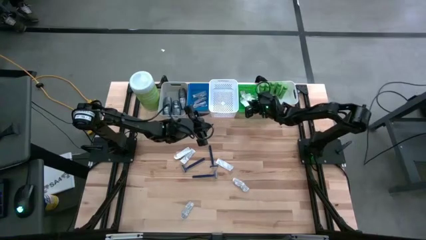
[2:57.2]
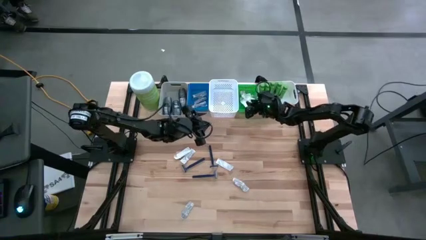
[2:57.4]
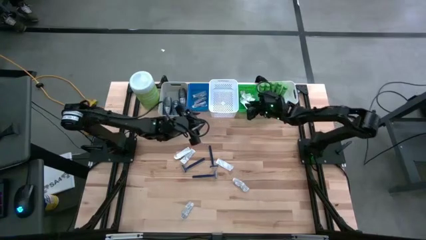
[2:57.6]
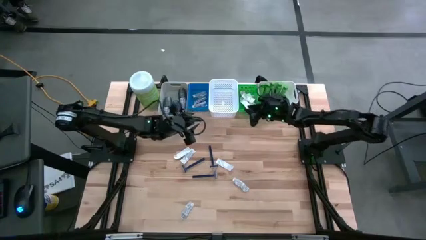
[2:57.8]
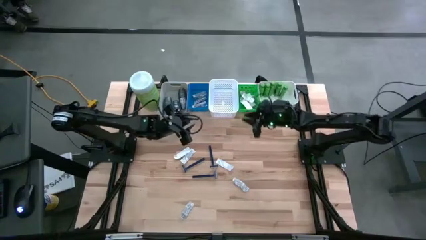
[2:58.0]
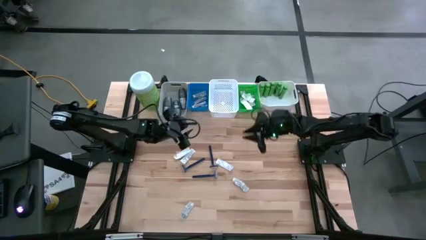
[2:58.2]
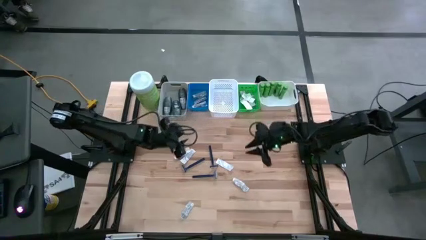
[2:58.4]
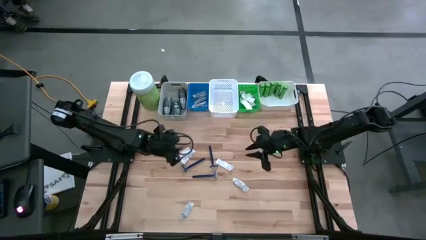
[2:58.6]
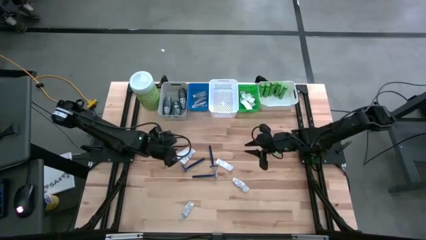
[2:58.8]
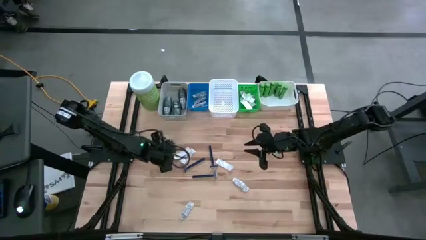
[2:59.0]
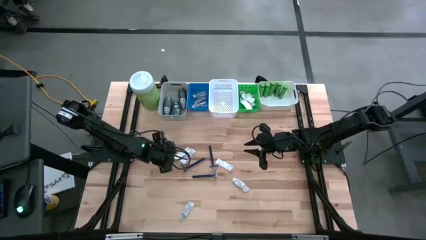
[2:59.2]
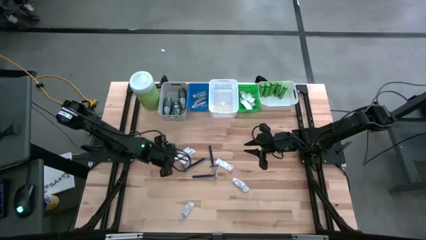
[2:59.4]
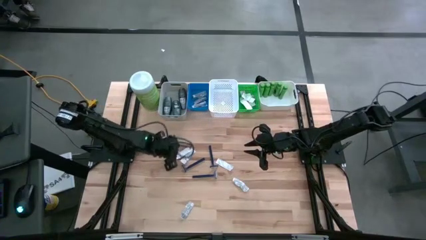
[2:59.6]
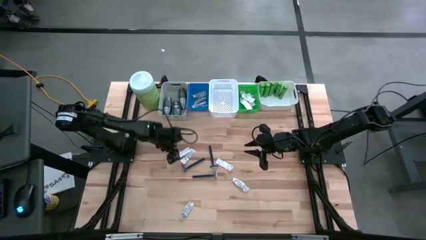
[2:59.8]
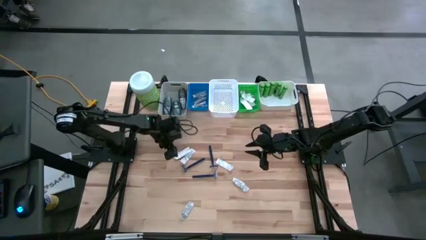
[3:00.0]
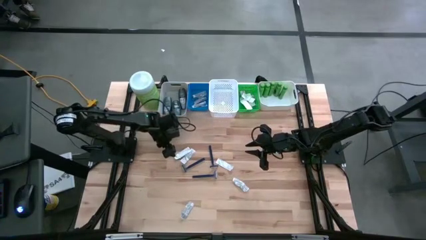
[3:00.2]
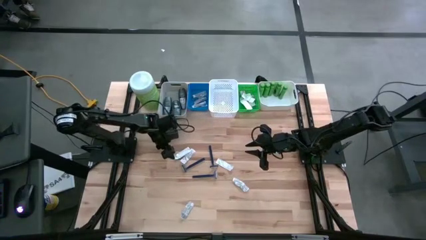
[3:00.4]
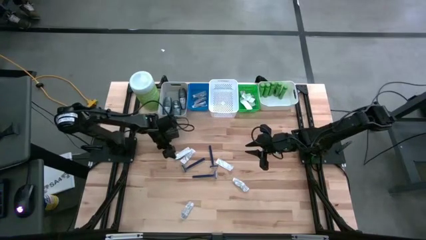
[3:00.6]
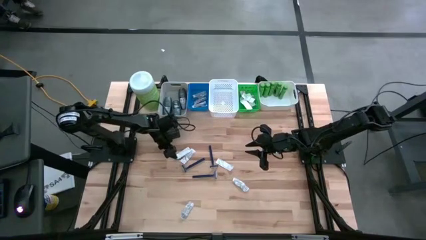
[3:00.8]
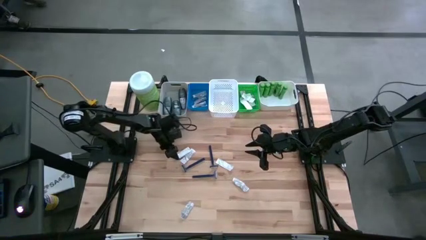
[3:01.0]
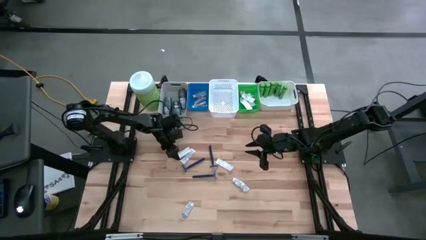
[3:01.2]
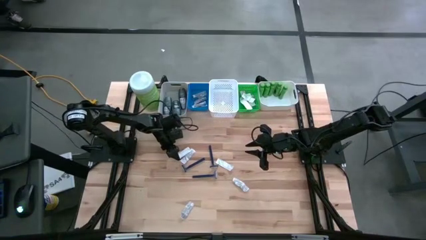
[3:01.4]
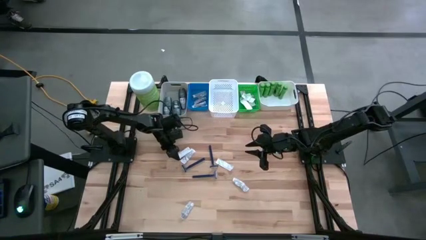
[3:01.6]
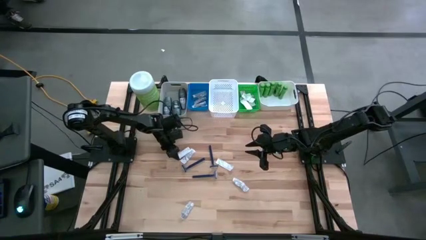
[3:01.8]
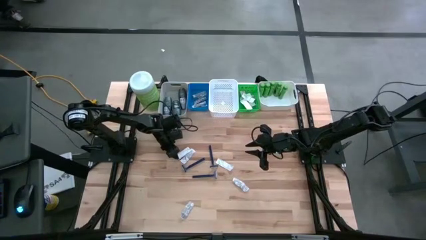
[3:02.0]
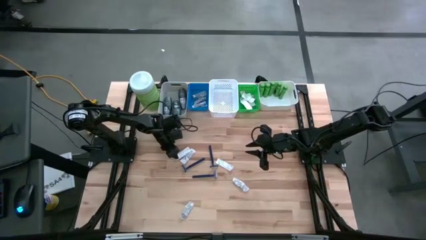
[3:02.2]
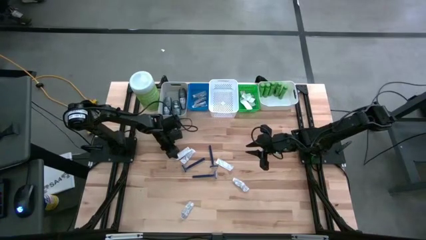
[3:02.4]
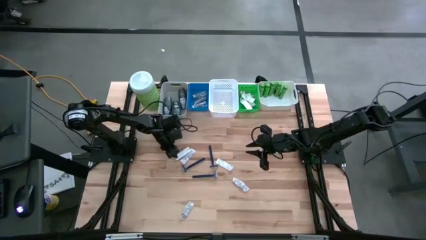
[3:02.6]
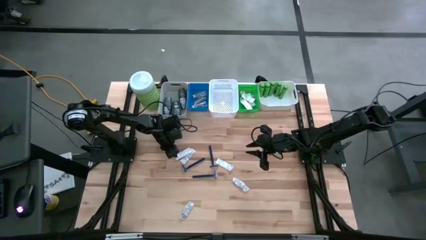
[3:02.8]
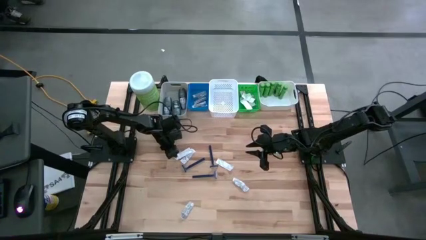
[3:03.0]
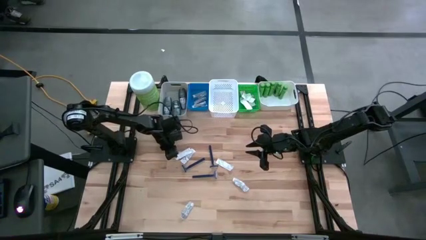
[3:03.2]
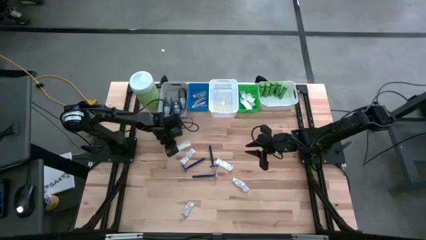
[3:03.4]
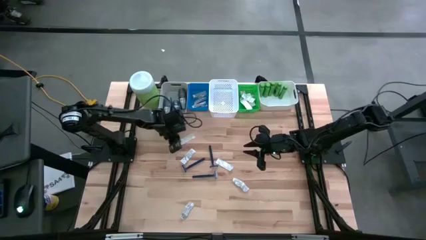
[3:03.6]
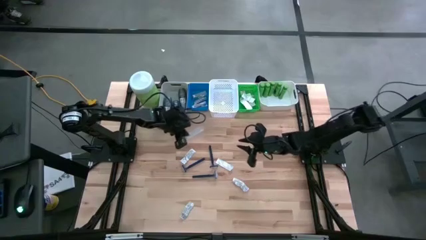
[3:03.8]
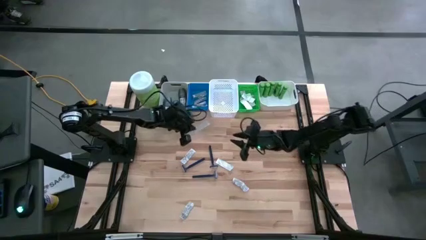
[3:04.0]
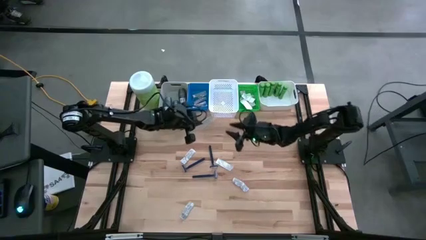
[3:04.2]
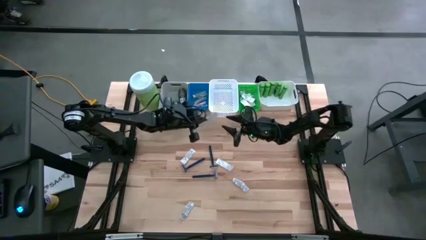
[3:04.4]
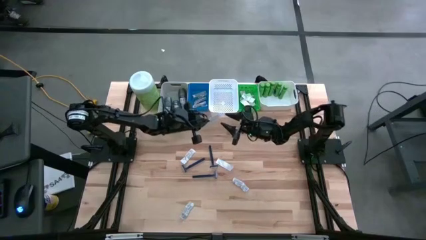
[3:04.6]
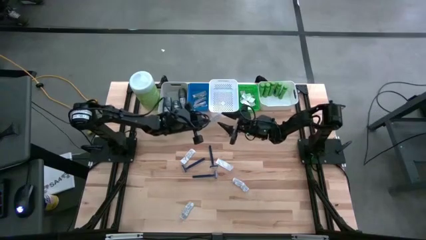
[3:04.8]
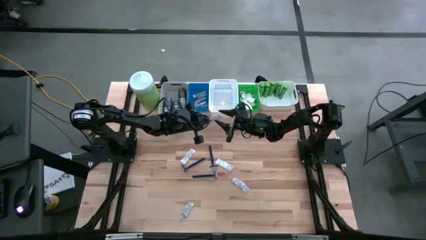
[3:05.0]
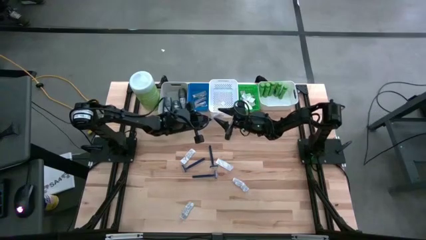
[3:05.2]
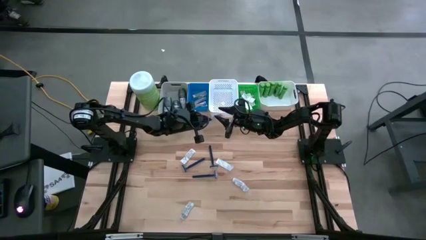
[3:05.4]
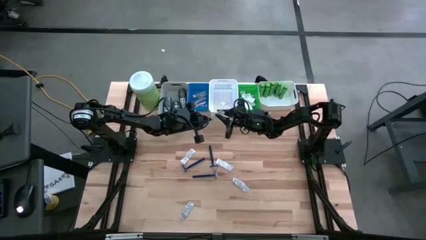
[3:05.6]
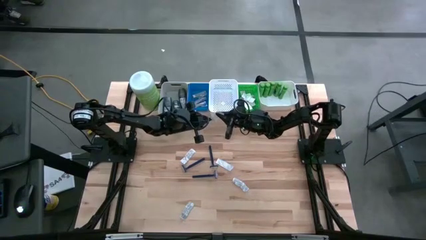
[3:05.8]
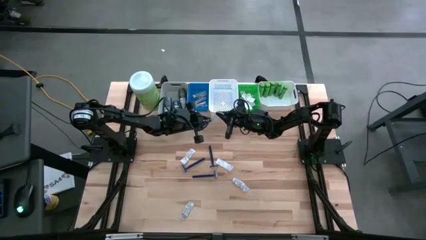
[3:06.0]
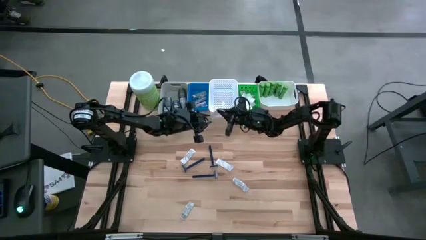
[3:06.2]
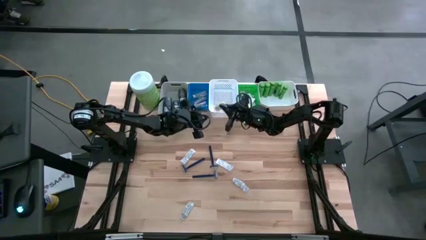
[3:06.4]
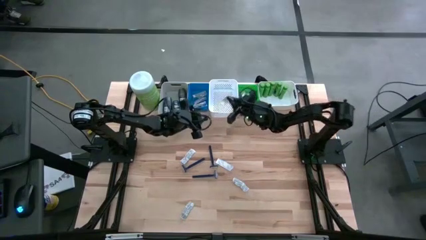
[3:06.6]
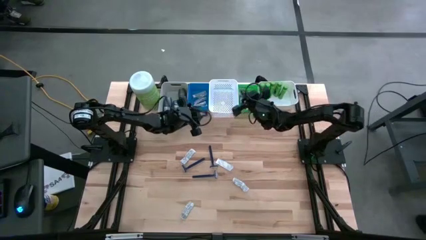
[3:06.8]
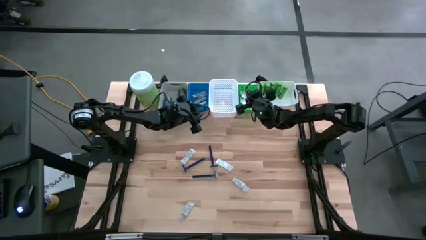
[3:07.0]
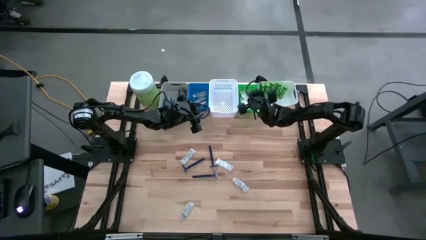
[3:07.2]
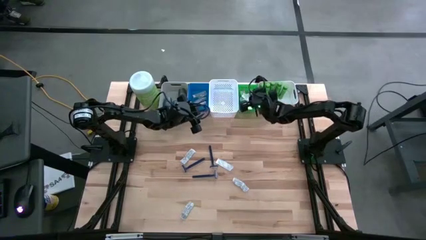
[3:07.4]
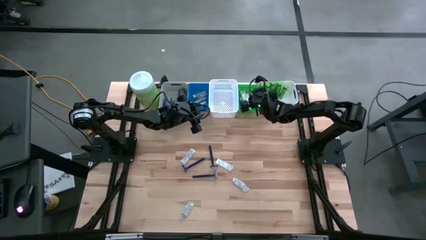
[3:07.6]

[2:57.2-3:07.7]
Task: Pick & Place Travel size toiletries
Put the white bandage pack into the green bin

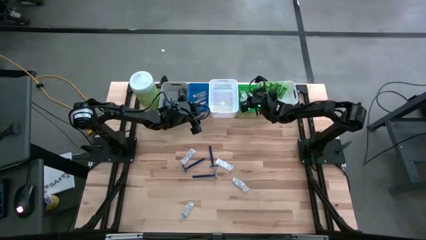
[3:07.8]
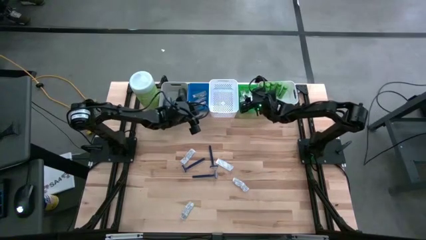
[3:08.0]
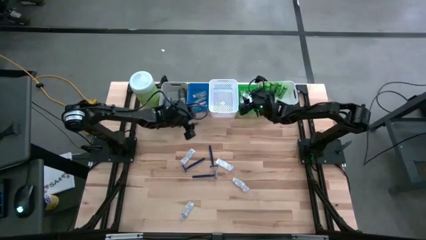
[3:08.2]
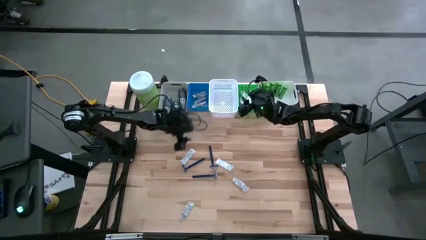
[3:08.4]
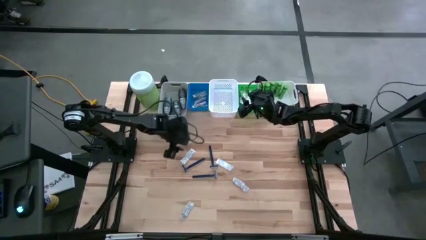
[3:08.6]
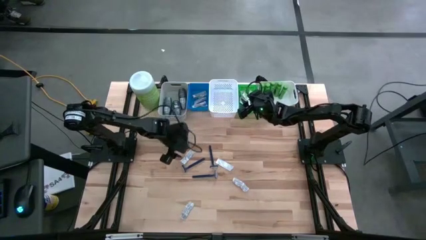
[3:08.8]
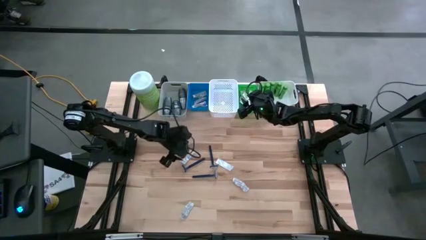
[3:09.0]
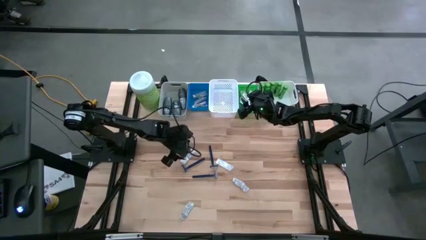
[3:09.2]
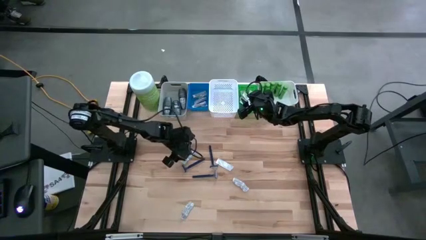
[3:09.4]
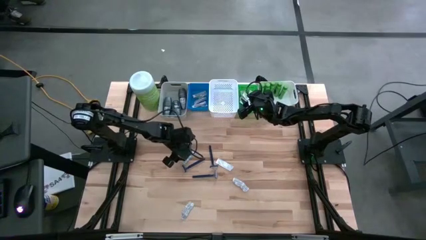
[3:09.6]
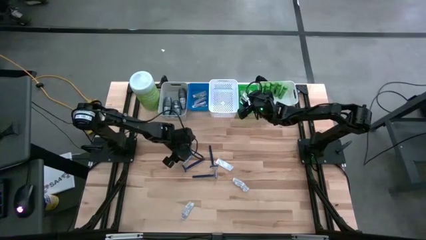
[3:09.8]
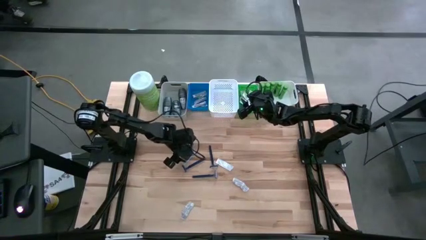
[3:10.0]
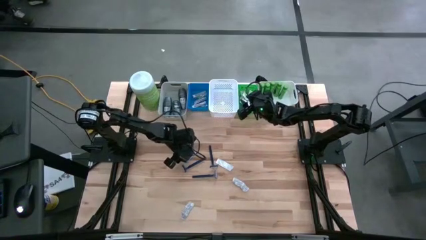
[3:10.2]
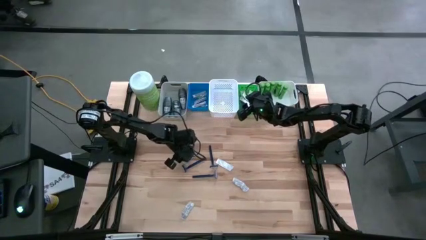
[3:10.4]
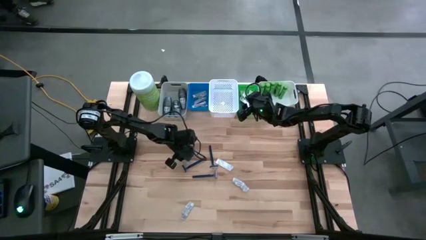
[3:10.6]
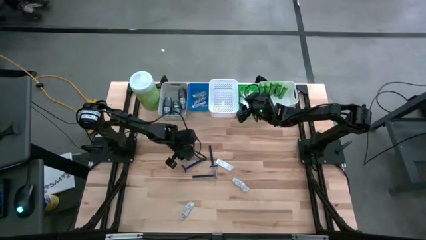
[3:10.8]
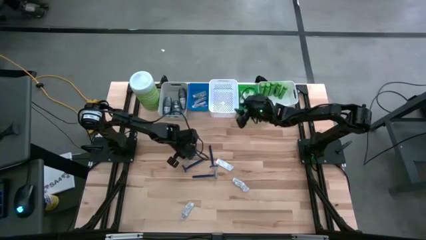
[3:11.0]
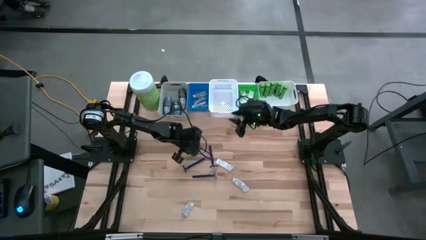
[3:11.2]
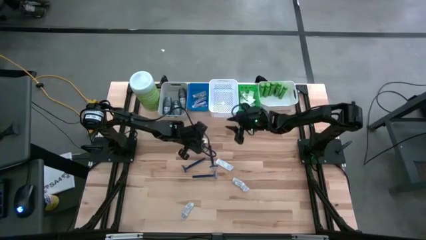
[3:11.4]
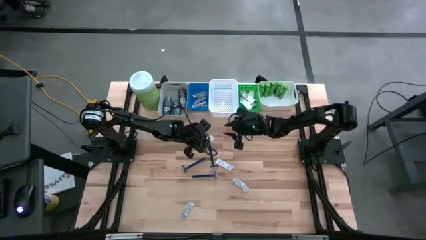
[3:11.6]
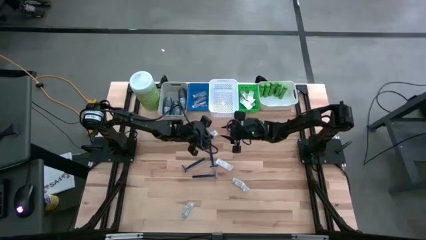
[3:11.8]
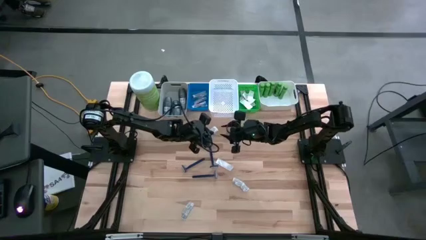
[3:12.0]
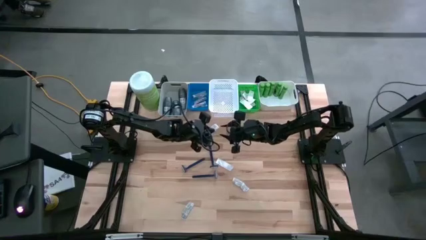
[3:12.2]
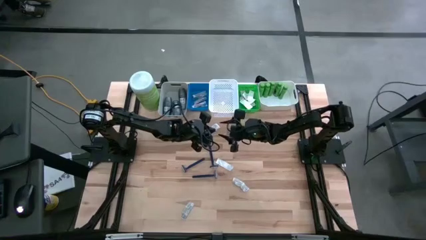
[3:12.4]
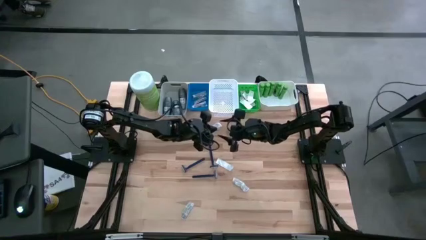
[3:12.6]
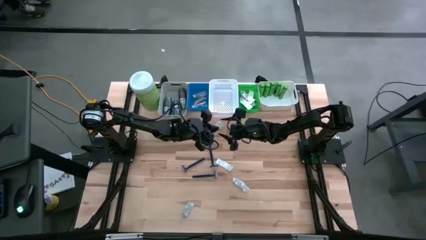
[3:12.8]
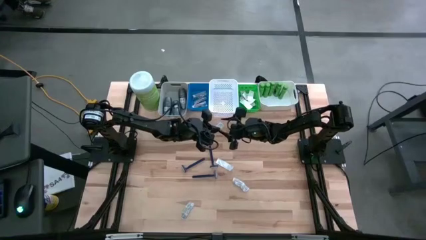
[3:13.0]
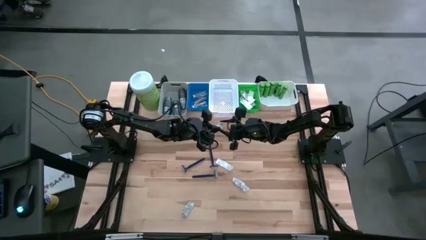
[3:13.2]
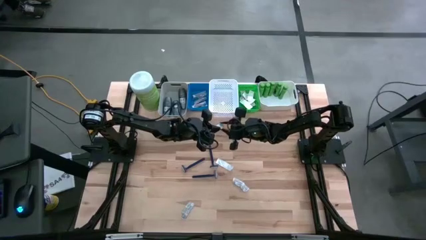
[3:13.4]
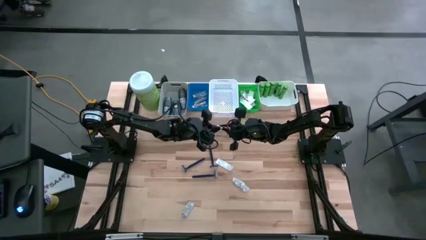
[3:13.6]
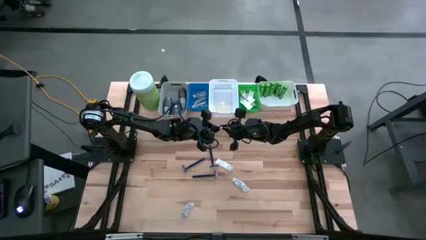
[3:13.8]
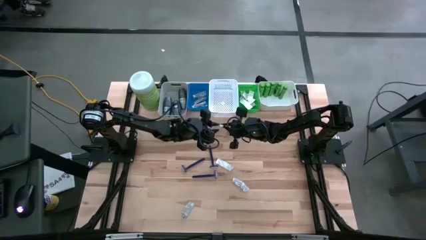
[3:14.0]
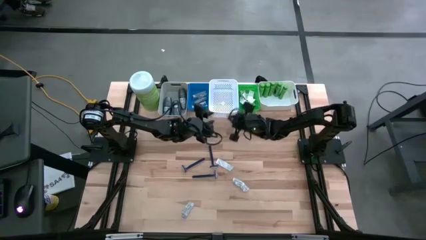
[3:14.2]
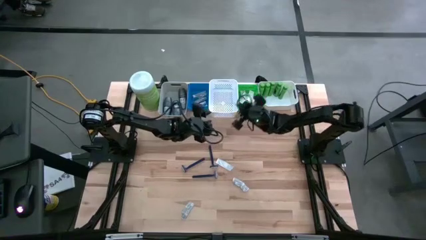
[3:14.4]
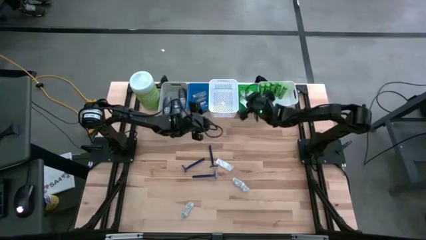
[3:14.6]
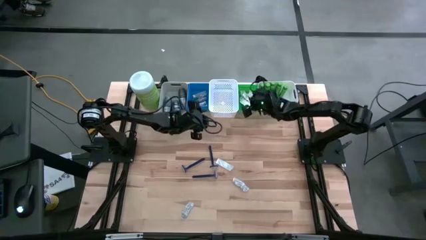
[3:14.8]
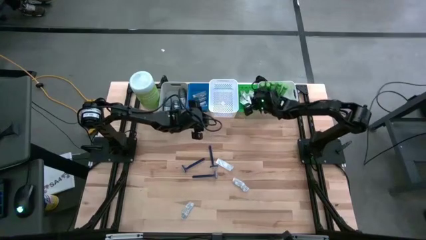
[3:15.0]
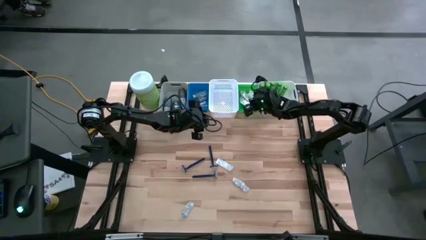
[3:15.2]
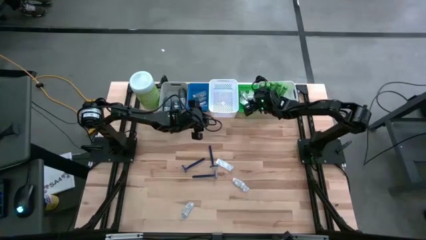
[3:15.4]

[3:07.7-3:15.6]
Put the white bandage pack into the green bin
